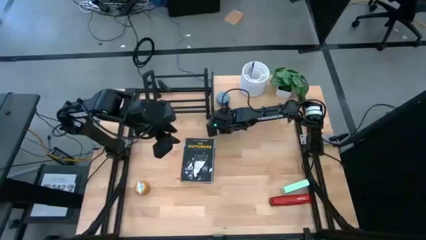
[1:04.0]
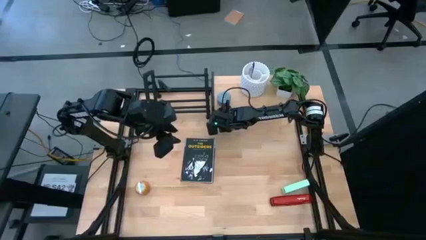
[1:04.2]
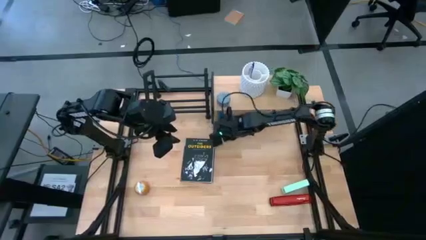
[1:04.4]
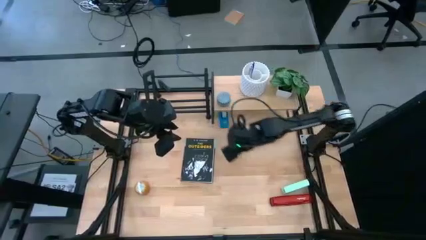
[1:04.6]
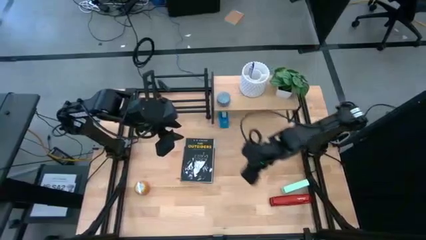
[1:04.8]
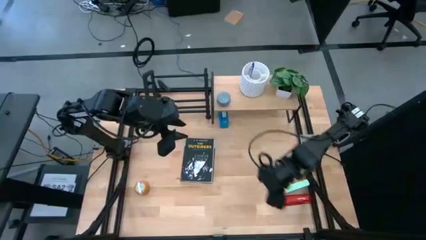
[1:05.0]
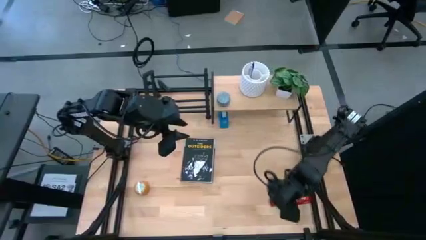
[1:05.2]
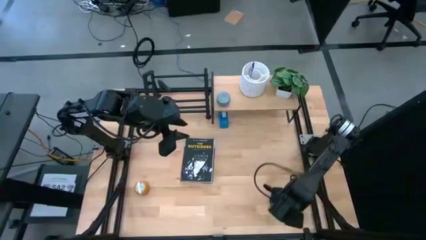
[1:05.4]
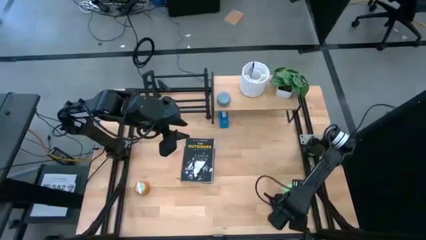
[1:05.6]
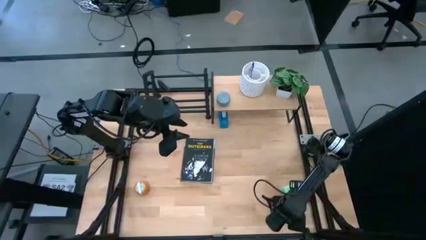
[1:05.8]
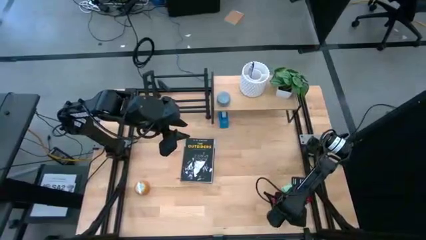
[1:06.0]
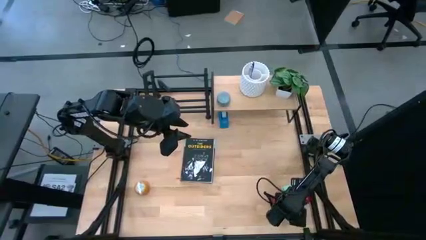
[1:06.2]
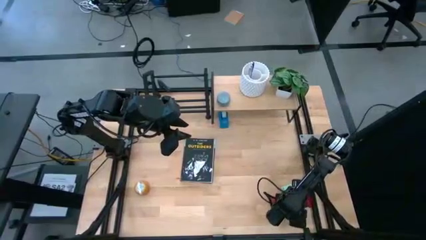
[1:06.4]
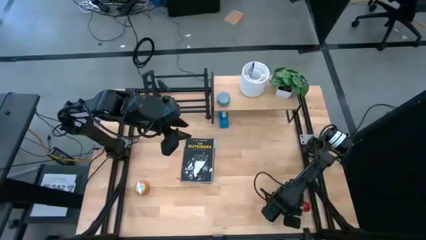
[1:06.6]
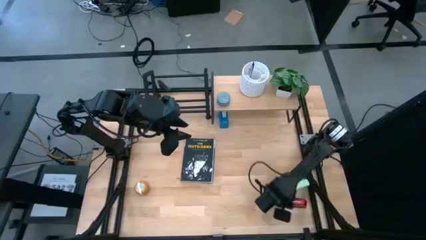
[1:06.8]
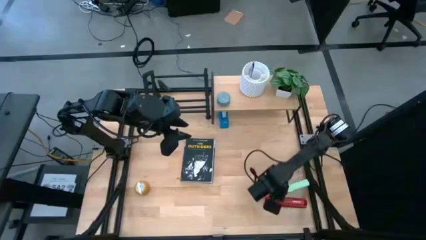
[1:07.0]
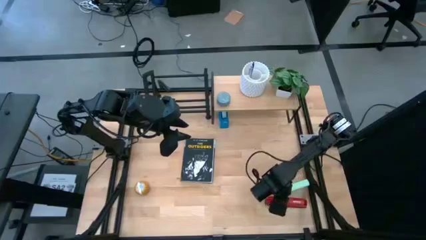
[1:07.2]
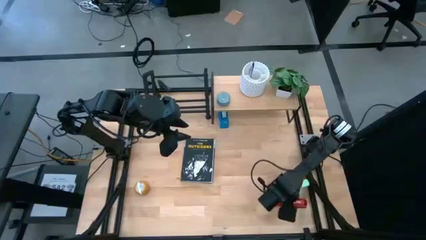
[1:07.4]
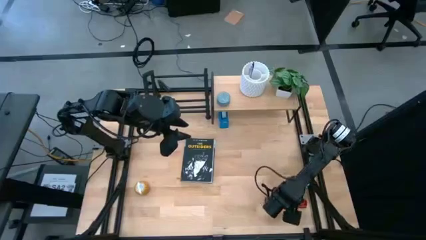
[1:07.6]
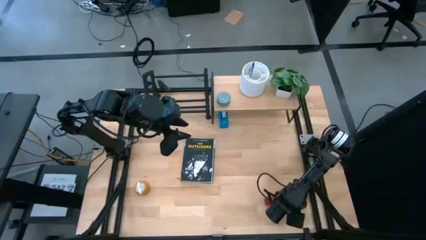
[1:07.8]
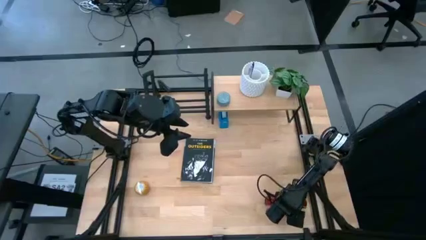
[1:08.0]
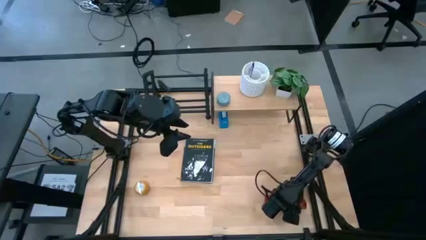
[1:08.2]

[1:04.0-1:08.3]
Task: Stock shelves
Put the red stapler under the shelf

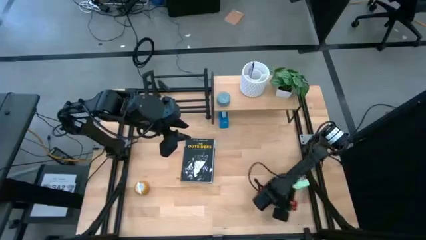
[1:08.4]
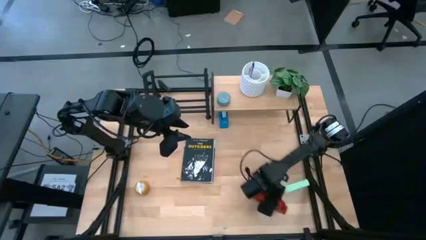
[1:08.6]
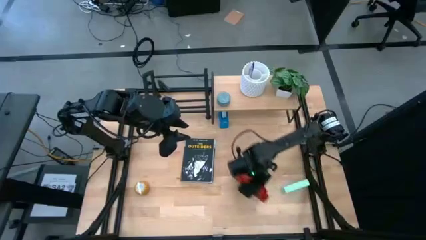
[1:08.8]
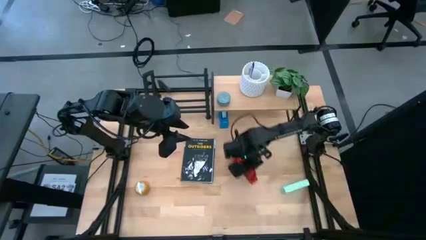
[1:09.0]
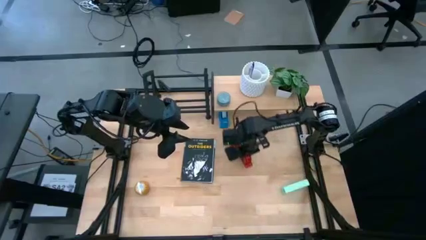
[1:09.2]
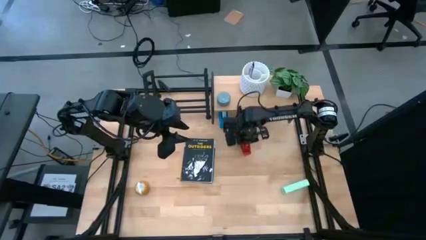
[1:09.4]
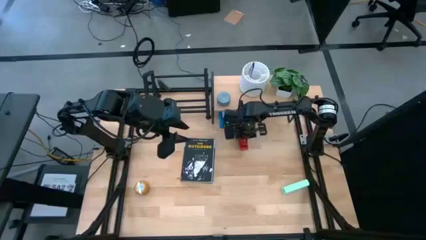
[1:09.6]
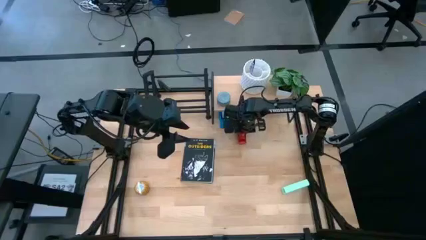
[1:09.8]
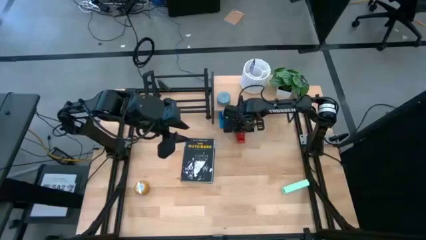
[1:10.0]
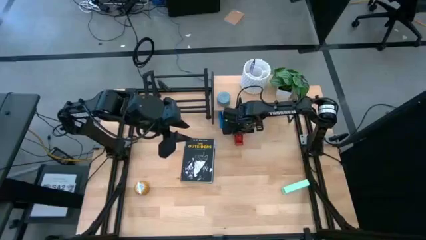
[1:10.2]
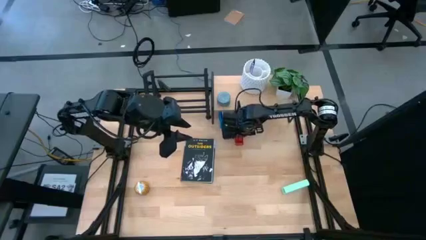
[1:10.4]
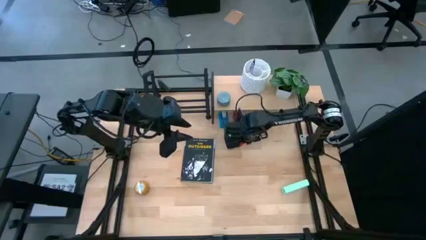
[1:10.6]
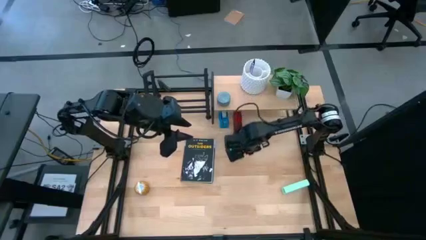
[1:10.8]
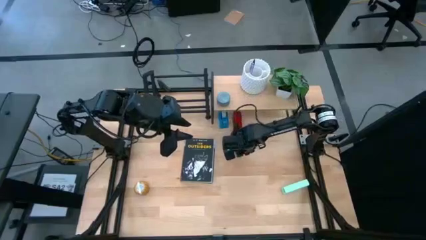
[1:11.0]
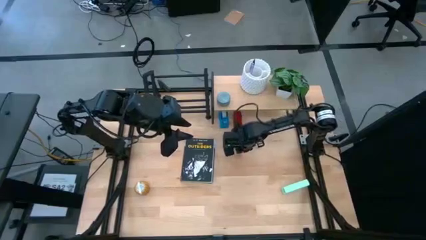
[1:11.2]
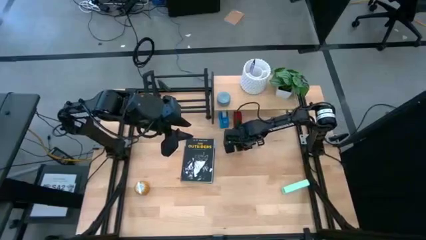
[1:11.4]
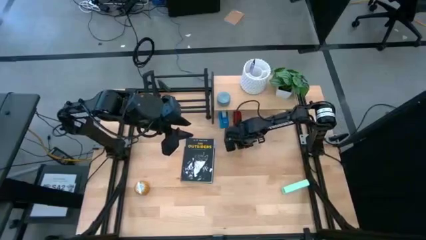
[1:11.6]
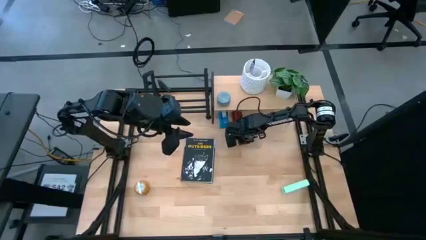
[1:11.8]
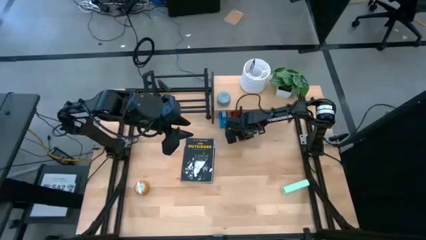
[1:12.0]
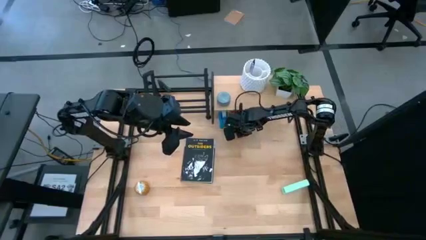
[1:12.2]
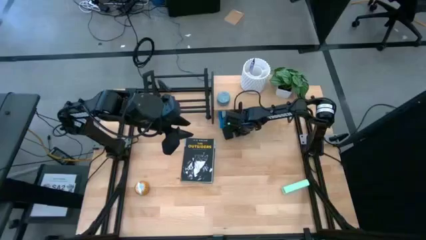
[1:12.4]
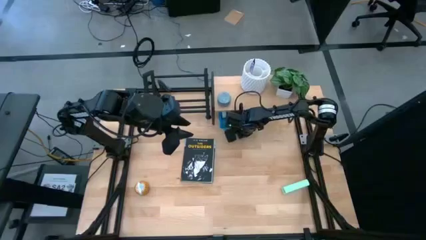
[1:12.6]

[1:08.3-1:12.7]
Put the red stapler under the shelf

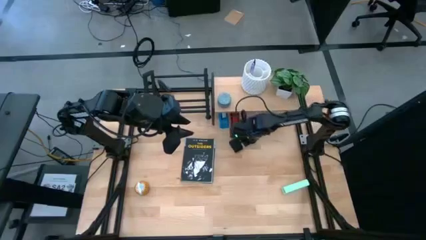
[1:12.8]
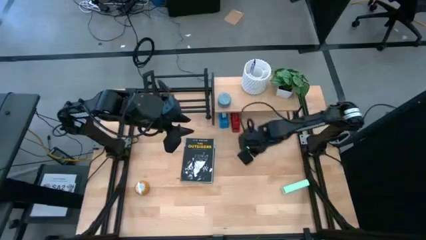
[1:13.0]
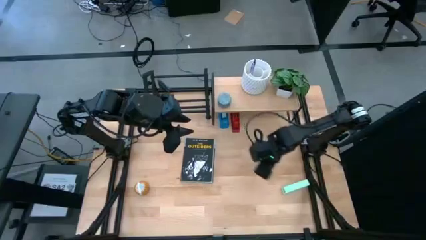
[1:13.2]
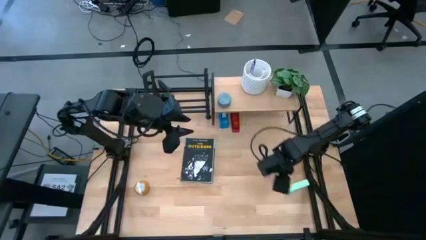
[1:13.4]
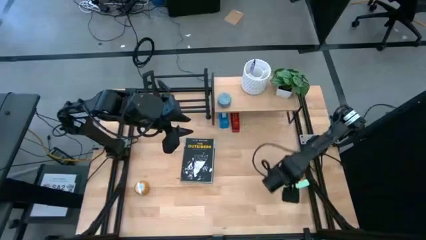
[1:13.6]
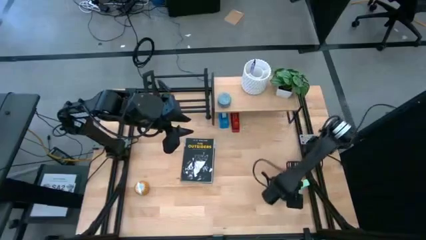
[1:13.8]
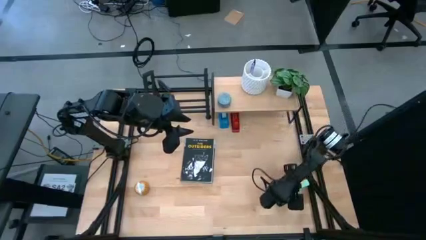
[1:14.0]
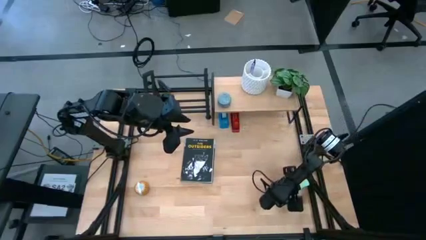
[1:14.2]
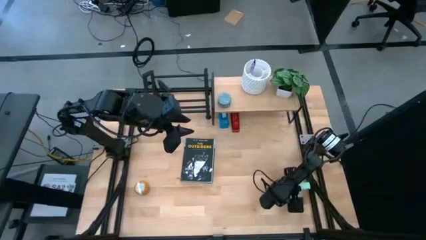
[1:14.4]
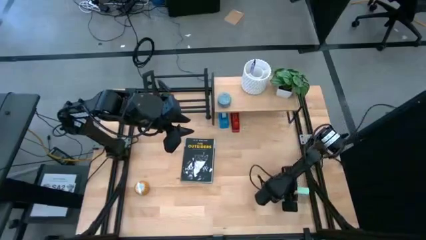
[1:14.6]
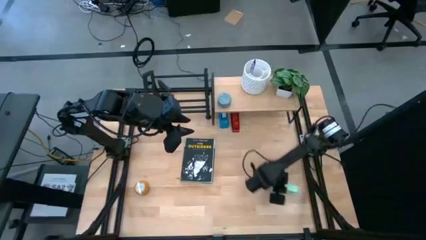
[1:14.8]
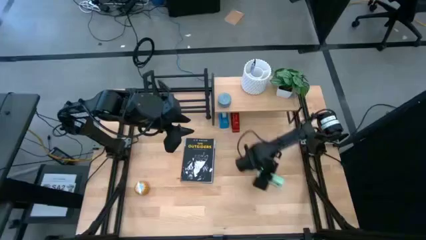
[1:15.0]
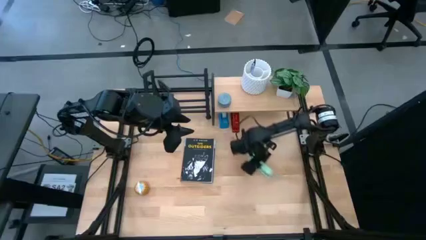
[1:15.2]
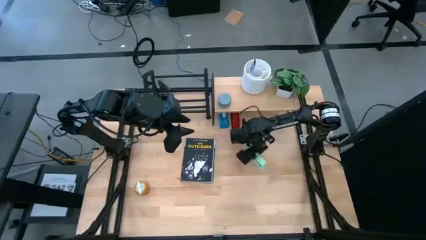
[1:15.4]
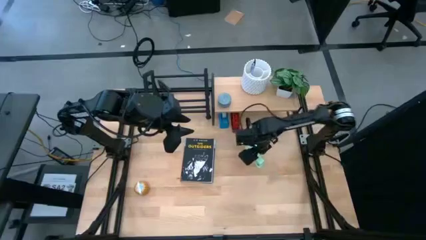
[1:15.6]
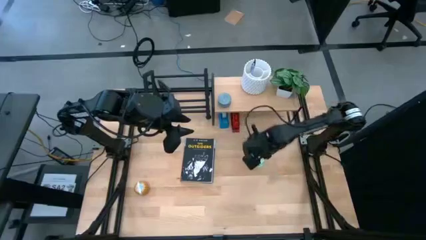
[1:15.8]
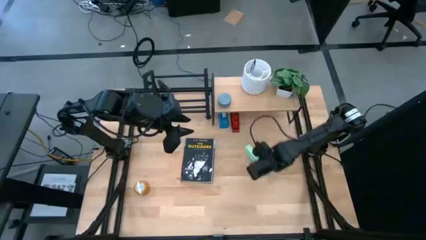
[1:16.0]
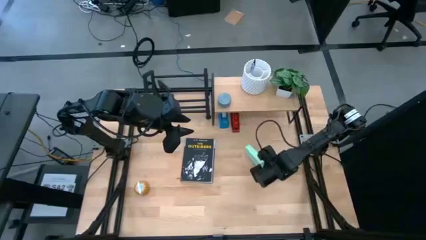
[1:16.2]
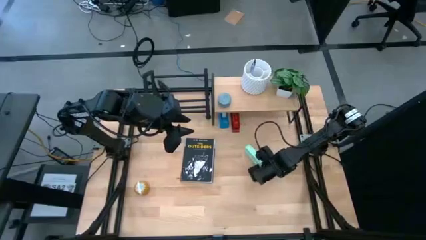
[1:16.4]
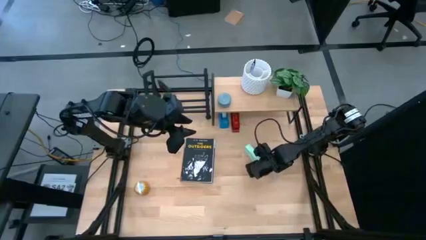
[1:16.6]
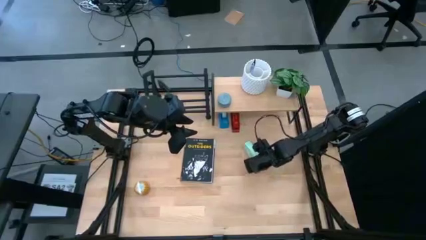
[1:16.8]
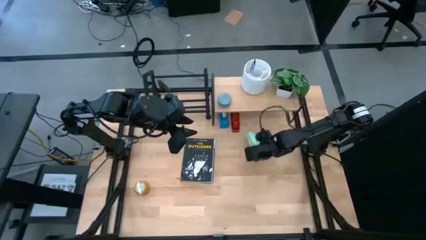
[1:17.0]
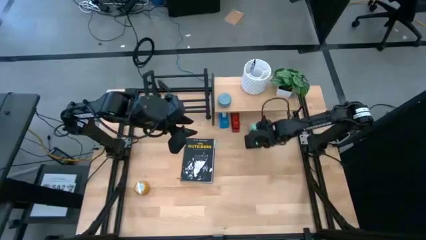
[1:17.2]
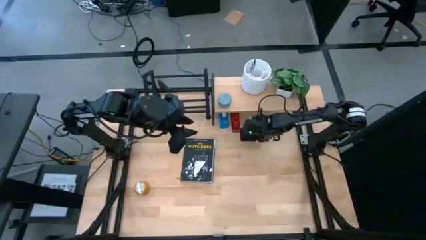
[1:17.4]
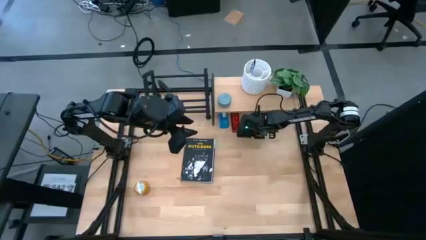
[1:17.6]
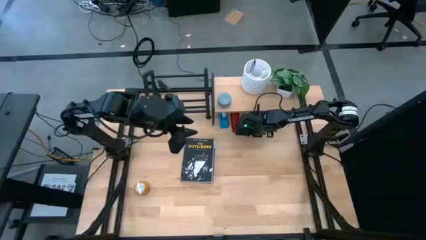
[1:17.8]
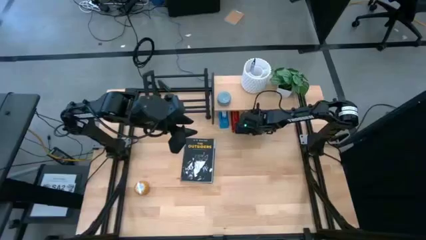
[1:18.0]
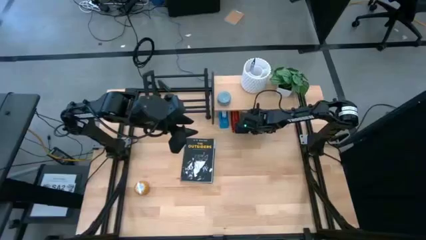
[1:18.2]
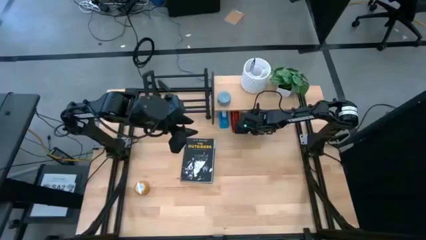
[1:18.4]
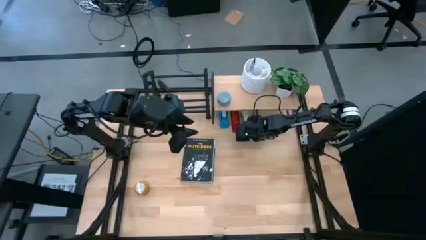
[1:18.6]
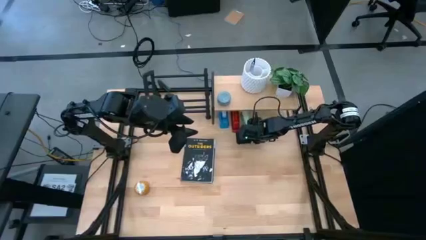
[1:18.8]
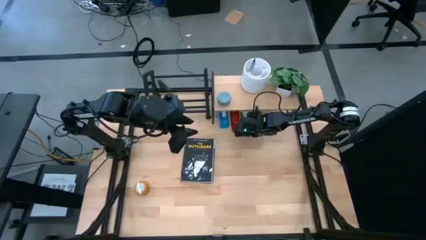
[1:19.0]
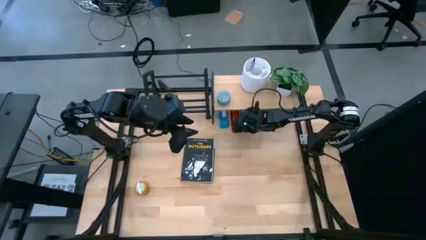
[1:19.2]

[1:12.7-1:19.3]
Put the light green stapler under the shelf

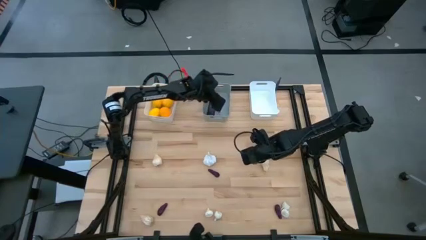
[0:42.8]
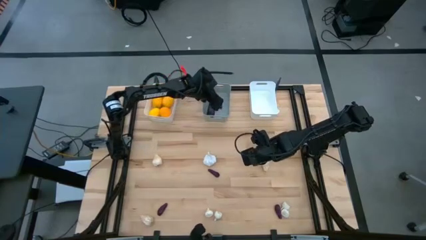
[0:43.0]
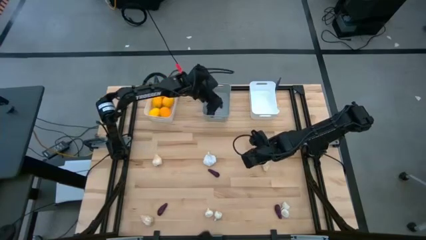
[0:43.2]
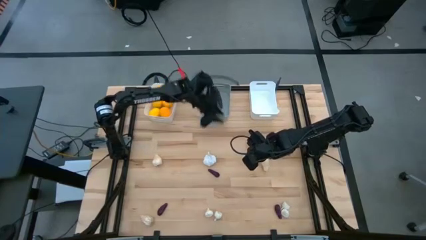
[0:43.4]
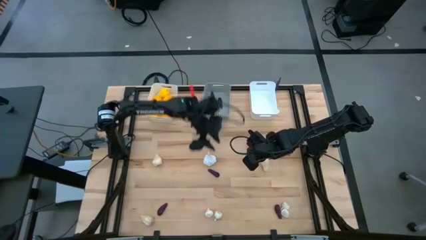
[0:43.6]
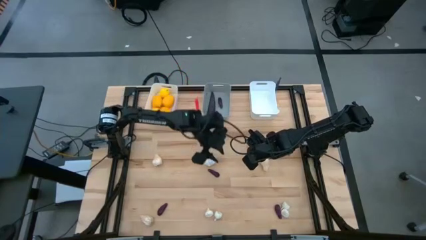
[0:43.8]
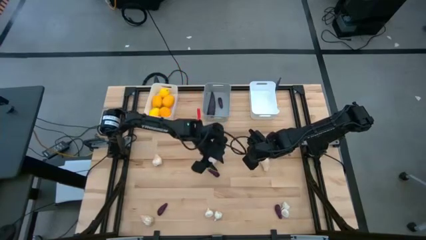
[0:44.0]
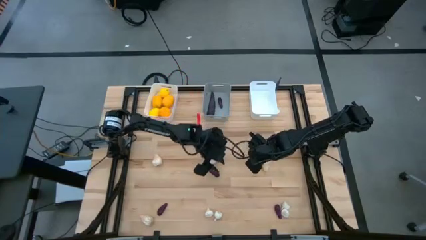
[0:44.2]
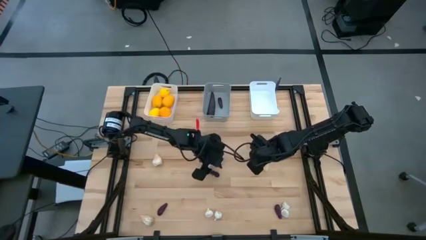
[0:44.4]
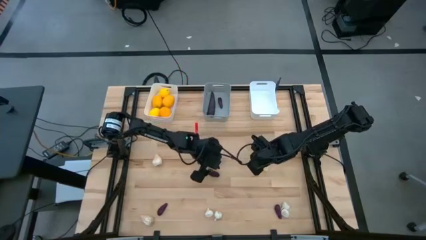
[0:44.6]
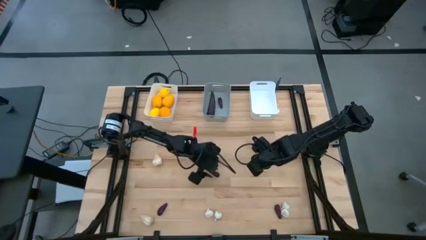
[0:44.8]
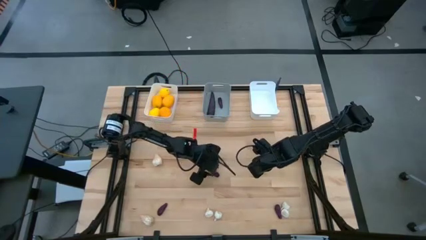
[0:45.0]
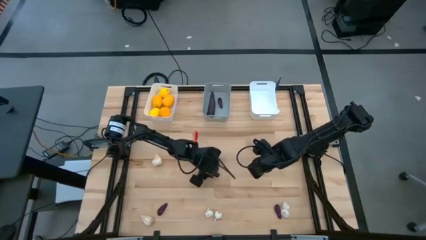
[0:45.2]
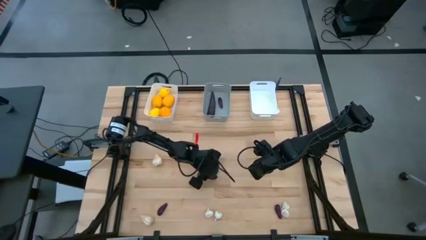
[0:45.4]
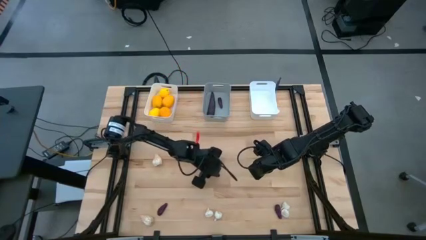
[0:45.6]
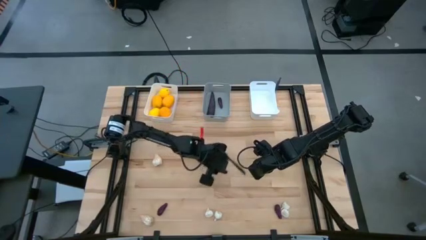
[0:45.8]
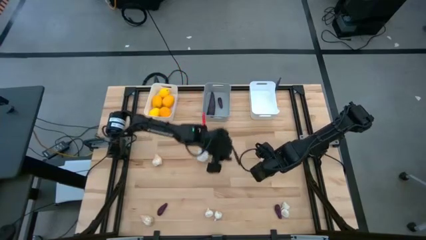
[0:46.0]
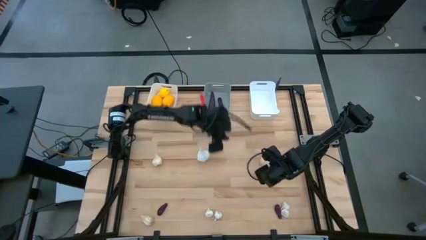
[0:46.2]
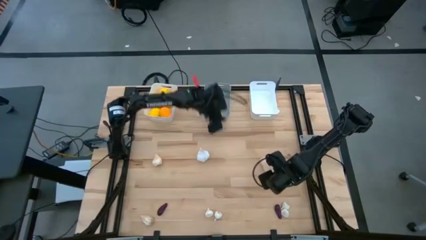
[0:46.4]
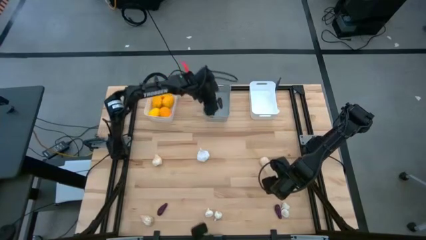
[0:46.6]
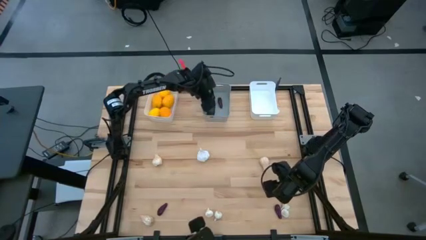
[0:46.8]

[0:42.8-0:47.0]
Task: Sort produce into baskets
Put the eggplant into the gray bin
